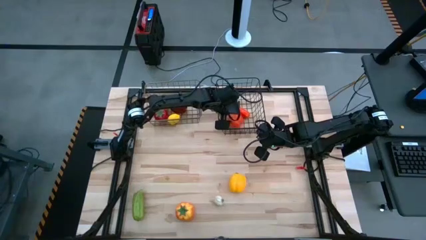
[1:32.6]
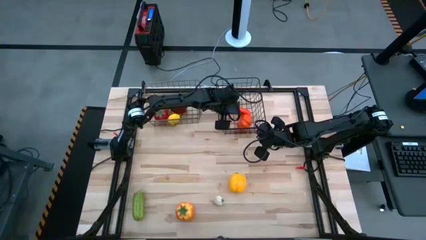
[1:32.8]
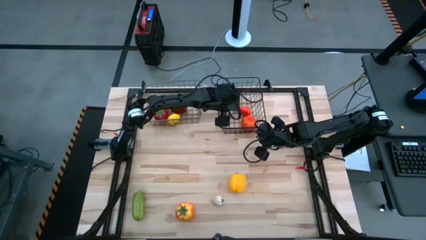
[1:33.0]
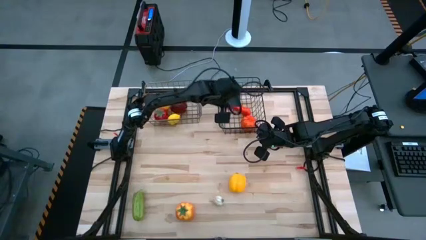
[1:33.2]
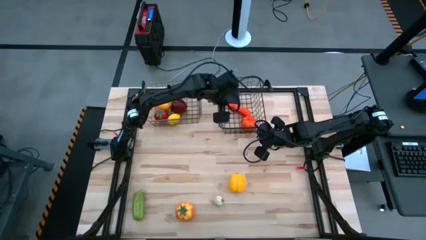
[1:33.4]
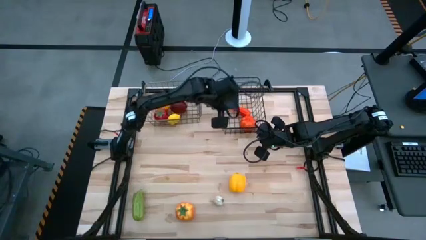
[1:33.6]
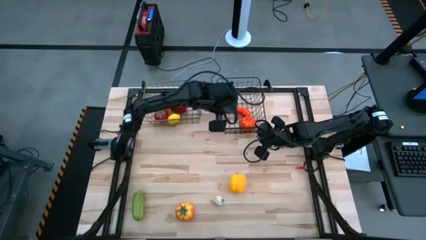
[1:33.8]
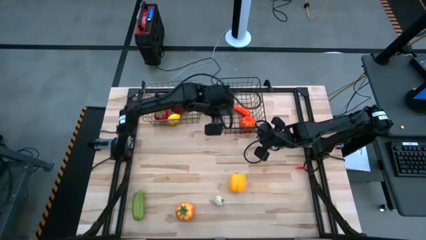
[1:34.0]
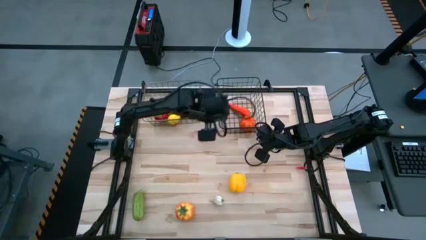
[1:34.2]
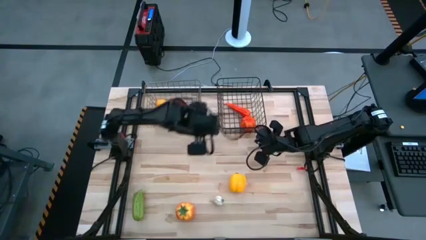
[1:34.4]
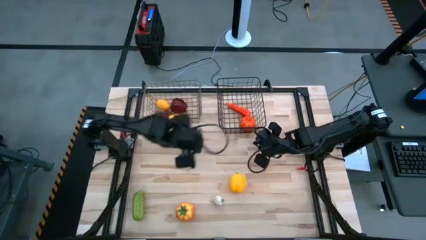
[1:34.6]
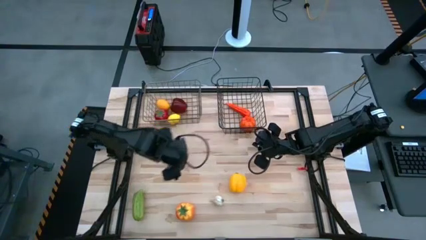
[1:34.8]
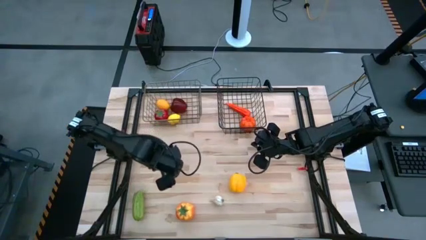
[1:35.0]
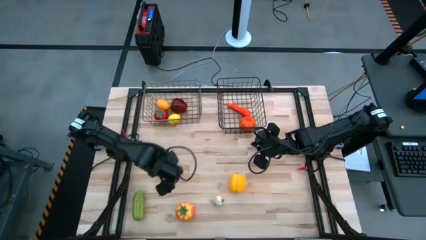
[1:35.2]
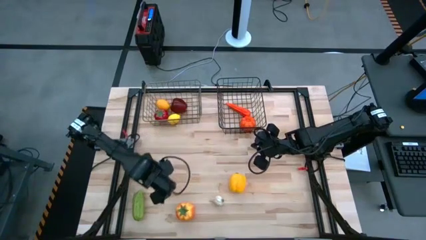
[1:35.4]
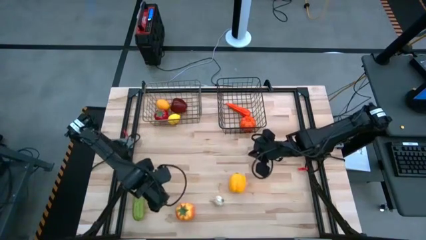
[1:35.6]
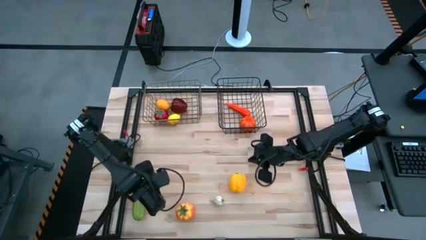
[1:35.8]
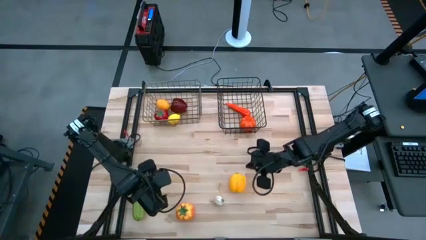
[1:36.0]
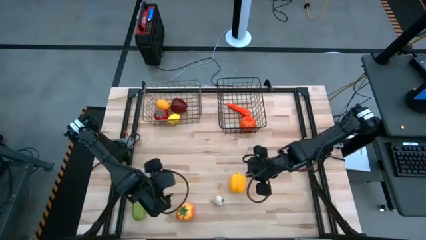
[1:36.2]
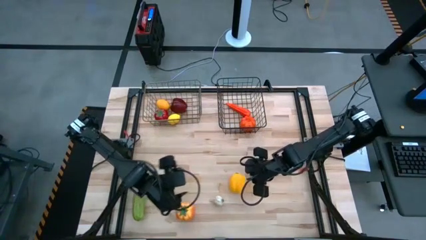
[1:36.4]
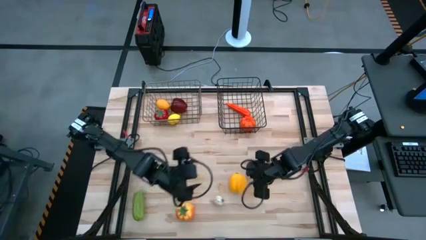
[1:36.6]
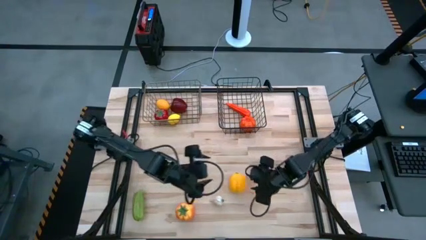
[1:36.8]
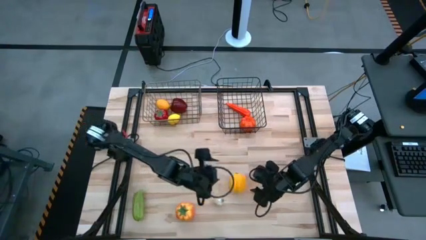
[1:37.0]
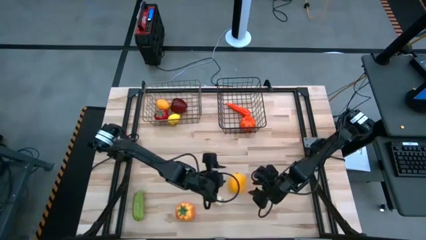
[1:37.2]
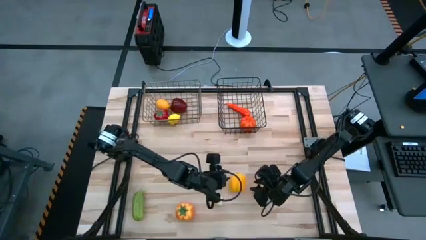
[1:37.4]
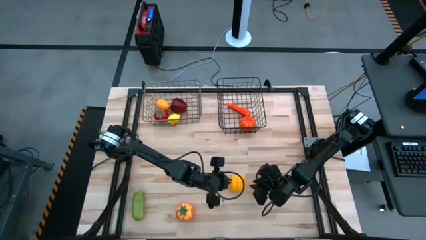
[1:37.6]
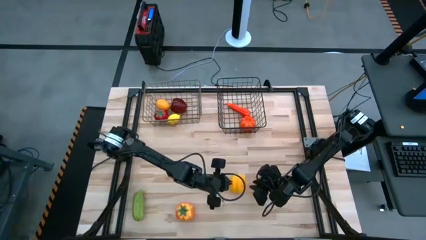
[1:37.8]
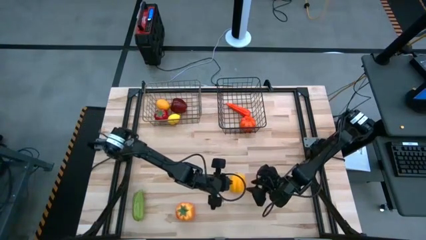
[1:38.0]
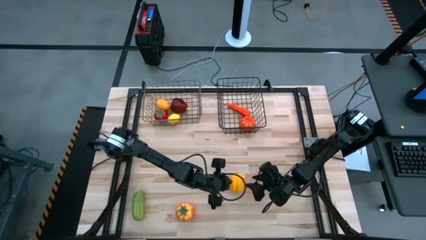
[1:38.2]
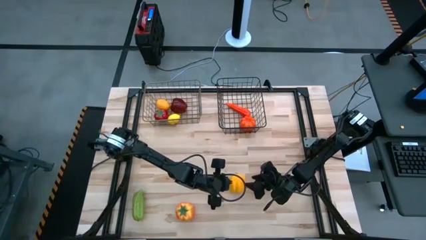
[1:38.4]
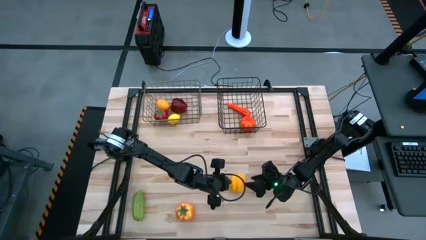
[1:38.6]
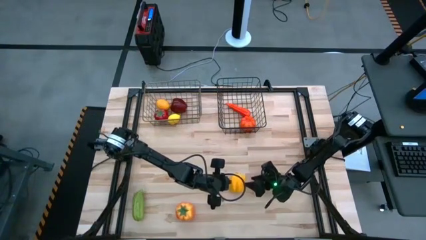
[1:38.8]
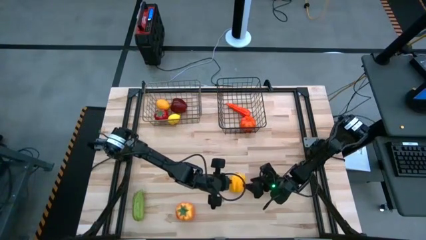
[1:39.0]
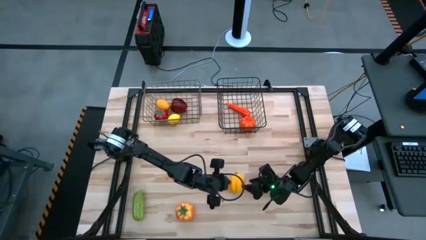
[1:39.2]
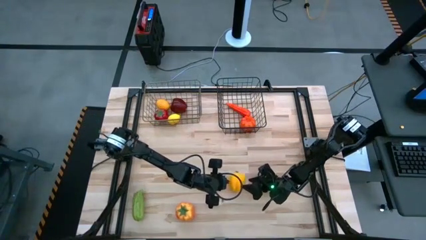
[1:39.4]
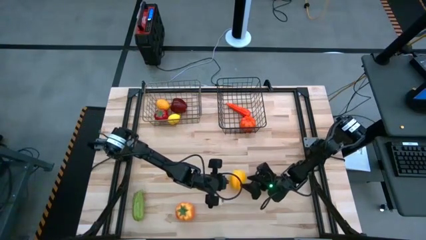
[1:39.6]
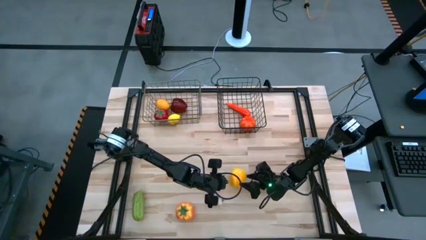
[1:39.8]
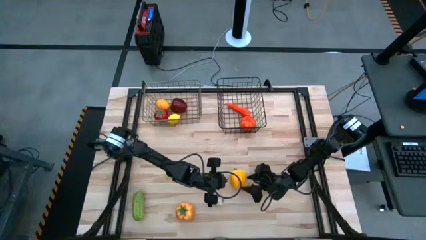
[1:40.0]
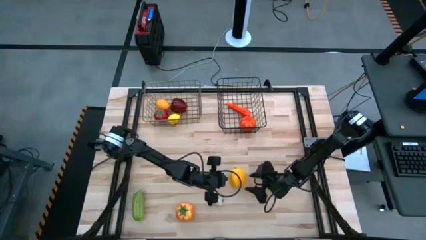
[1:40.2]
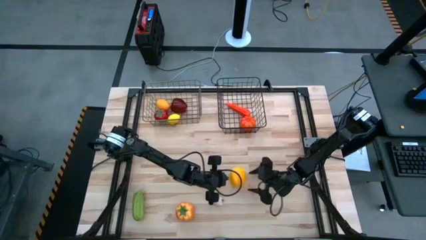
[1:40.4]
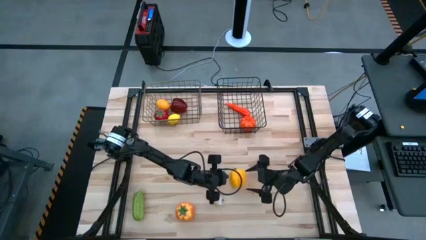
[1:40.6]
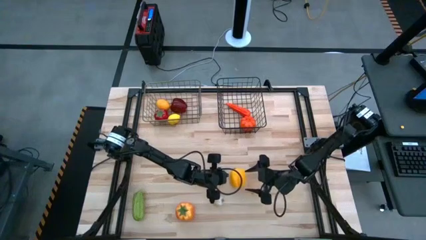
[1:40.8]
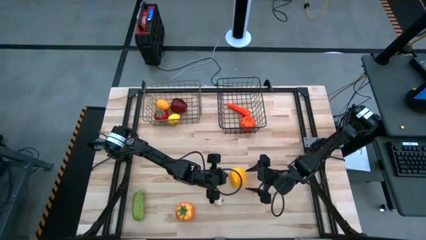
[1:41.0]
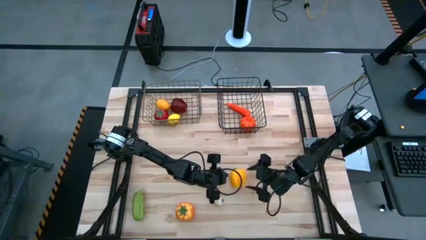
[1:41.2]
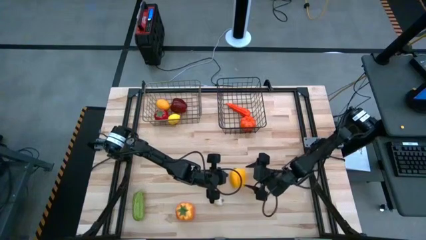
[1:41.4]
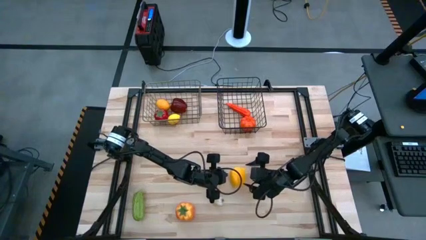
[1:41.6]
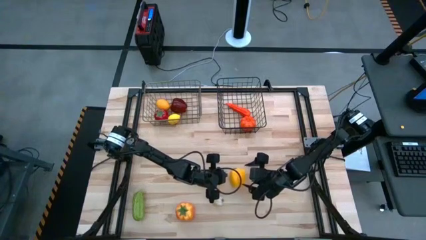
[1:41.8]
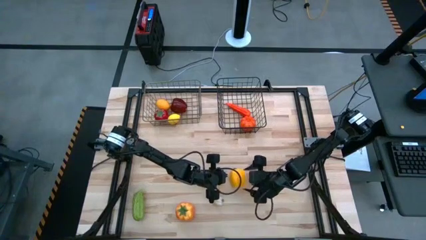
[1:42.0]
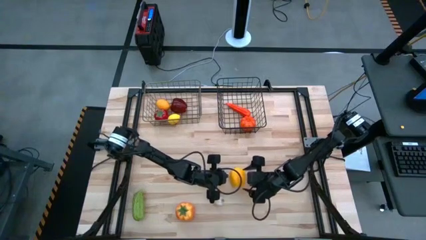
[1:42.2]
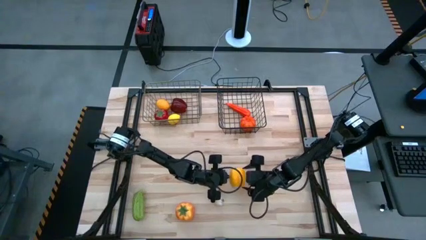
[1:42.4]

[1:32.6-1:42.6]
Task: Sort produce into baskets
Put the bell pepper into the black wire basket

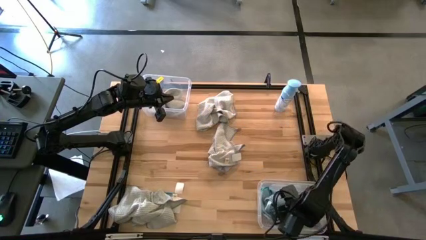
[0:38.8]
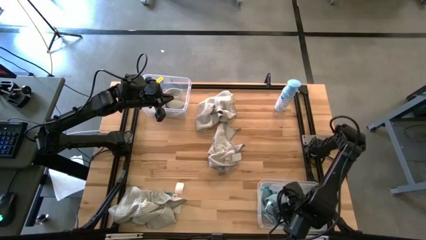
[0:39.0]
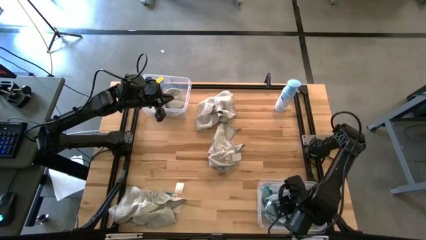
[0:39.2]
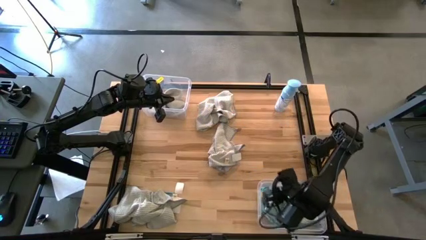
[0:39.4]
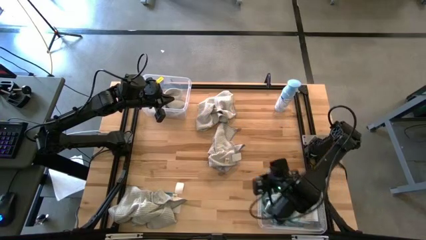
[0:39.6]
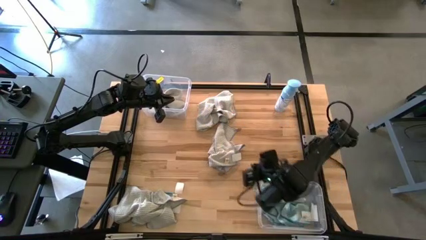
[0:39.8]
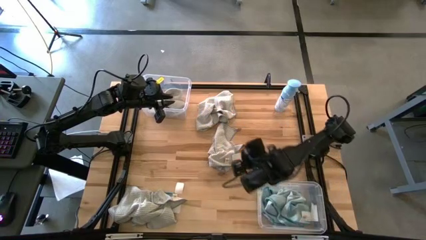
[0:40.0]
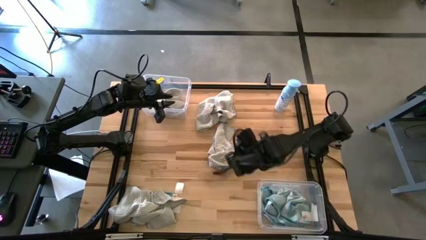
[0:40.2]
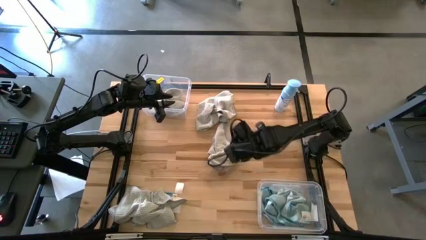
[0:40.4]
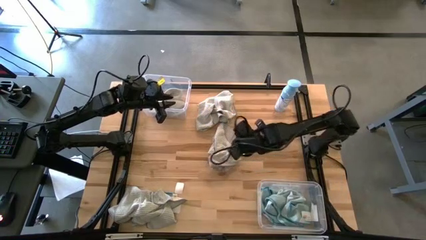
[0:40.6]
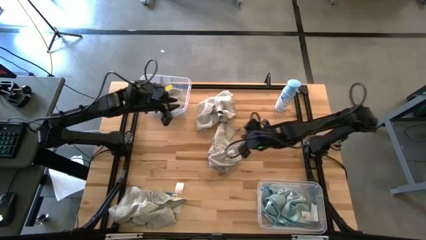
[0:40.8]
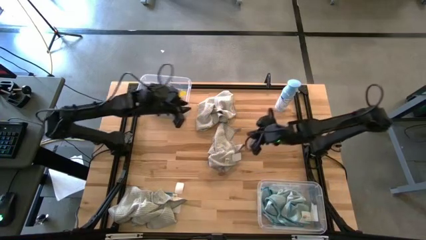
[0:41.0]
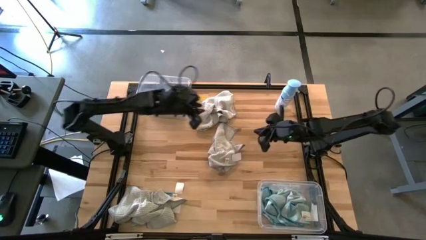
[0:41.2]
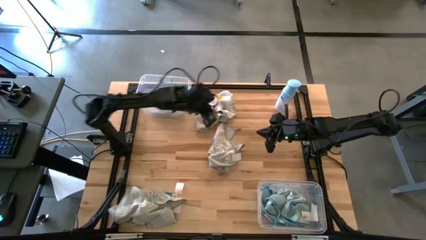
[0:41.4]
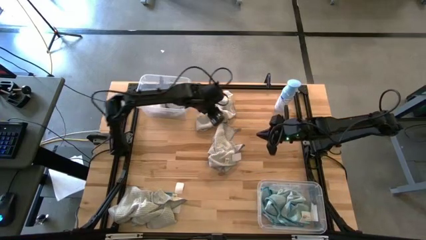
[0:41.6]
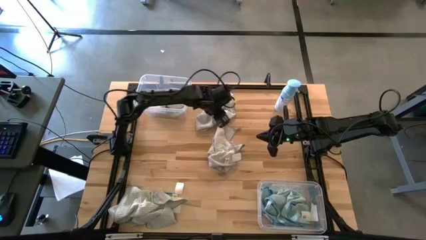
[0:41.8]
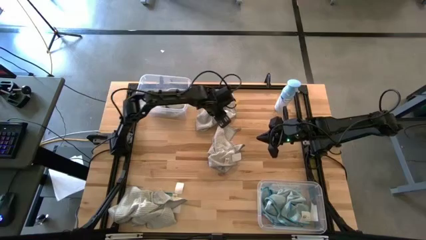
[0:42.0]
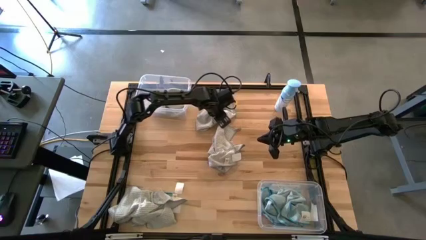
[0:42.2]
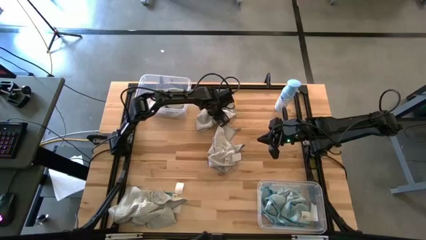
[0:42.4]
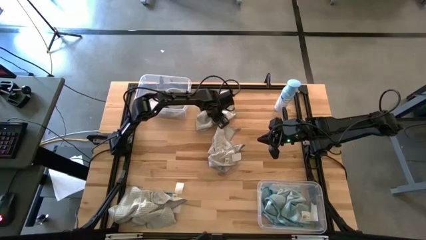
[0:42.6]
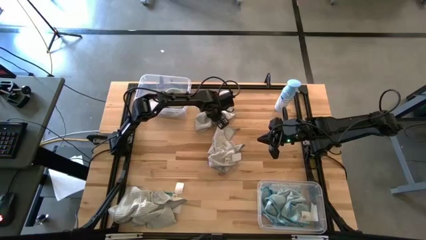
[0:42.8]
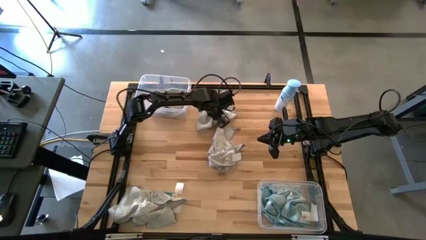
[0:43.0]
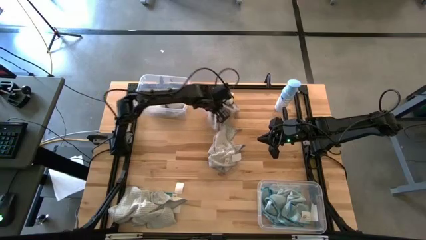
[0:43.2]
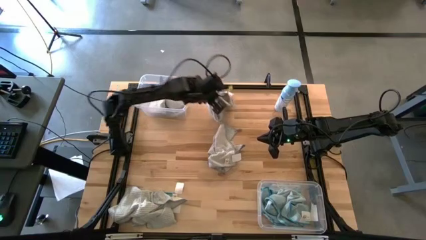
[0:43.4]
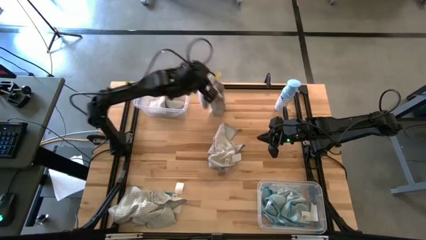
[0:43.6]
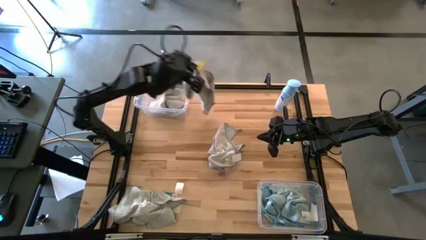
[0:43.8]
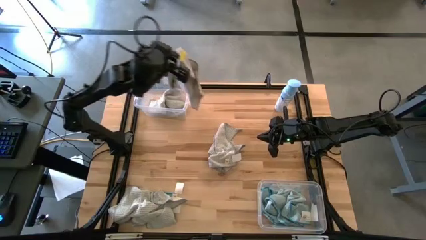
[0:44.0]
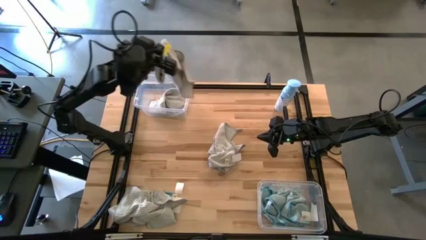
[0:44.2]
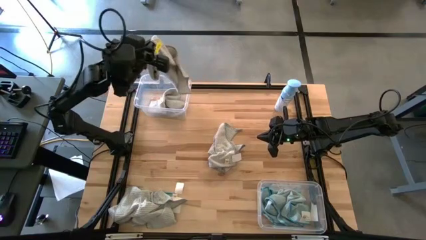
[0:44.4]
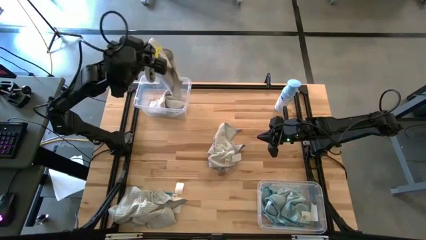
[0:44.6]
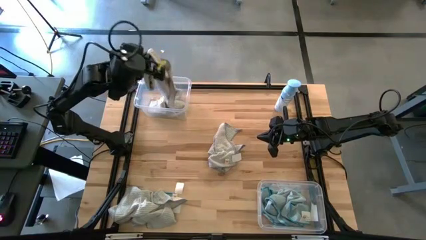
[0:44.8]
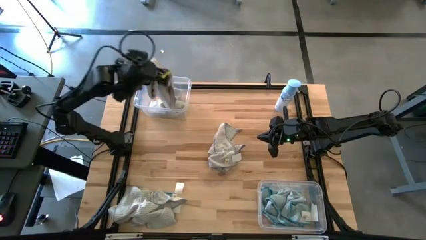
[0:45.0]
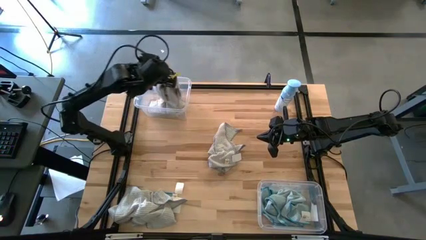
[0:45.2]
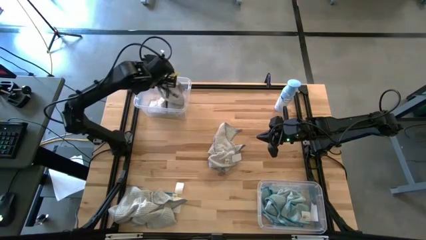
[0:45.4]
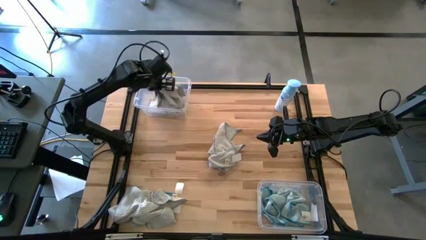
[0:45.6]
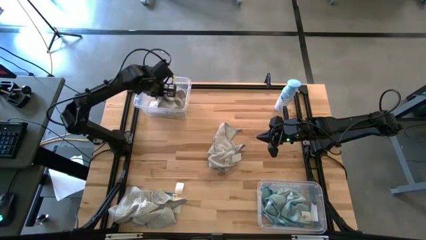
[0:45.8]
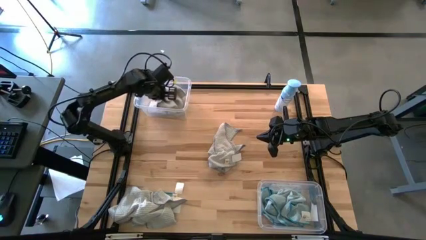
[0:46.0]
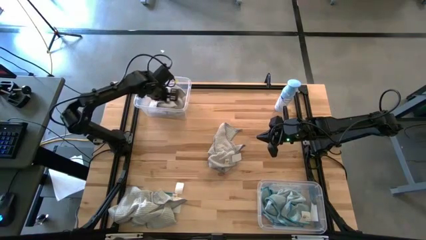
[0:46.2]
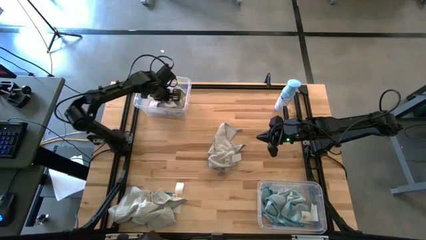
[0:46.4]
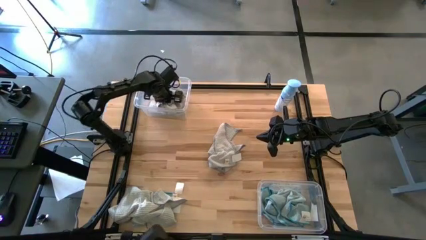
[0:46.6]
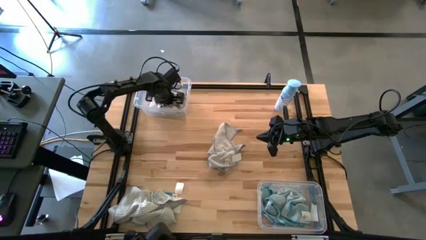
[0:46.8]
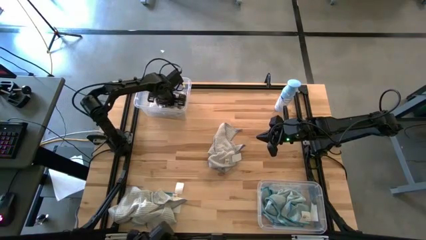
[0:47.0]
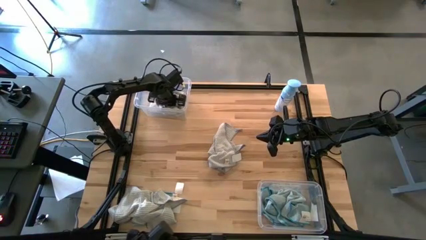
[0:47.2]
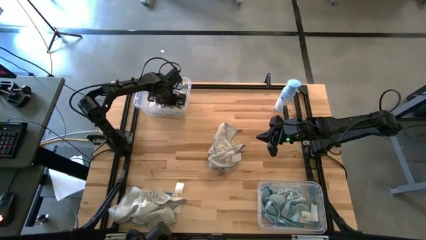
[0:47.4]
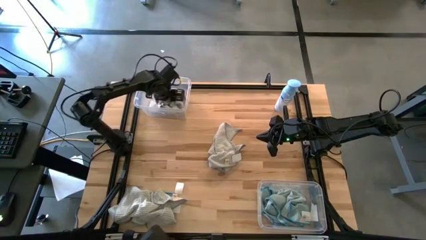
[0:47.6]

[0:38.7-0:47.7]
Task: Sort microfiber towel by color & place in baskets
Put the top center white microfiber towel into the top transparent bin
